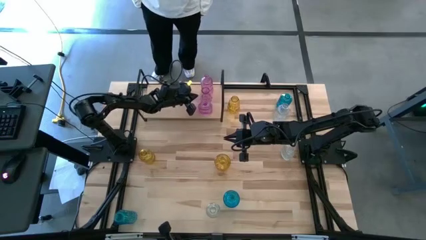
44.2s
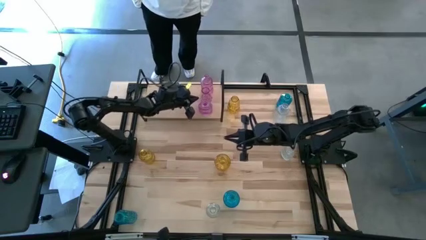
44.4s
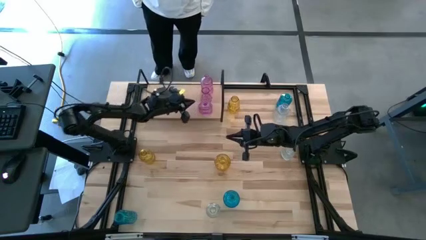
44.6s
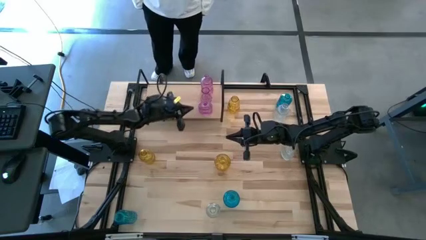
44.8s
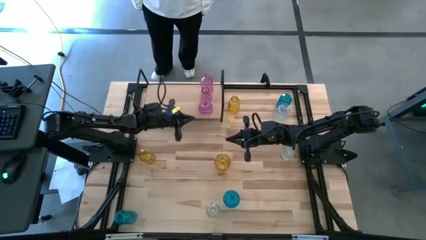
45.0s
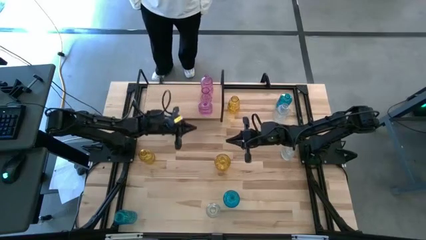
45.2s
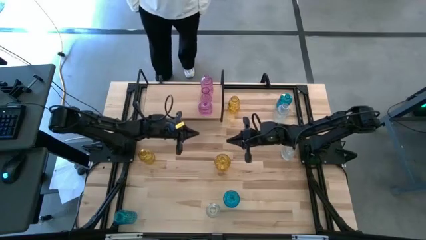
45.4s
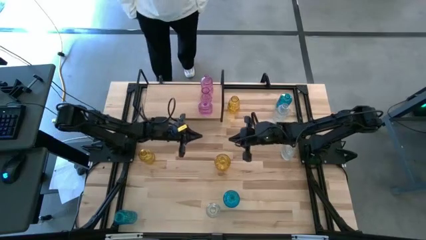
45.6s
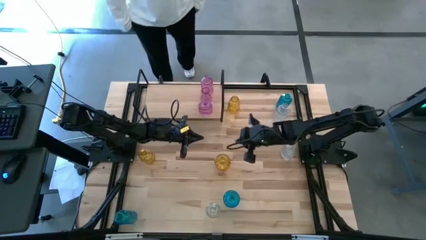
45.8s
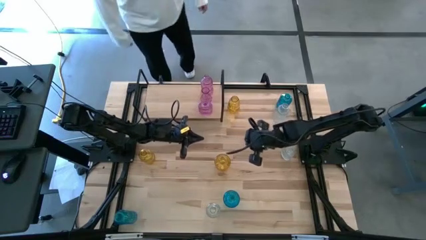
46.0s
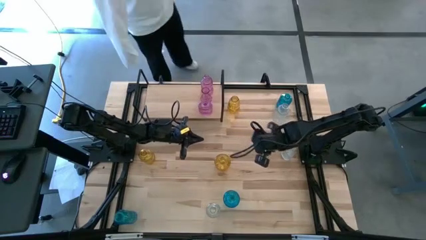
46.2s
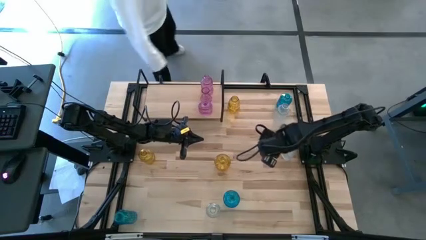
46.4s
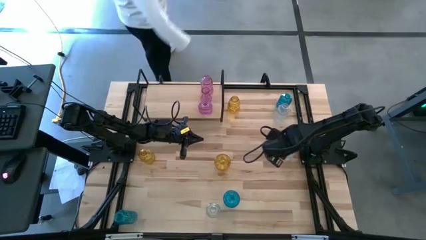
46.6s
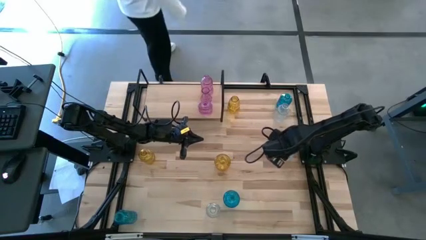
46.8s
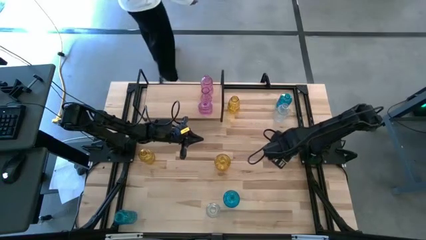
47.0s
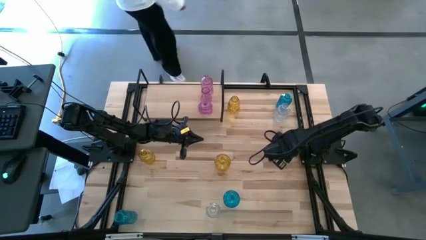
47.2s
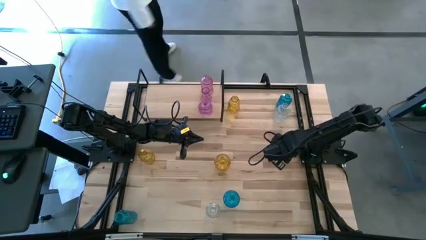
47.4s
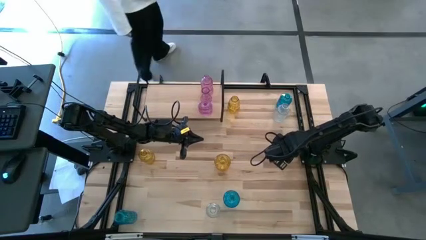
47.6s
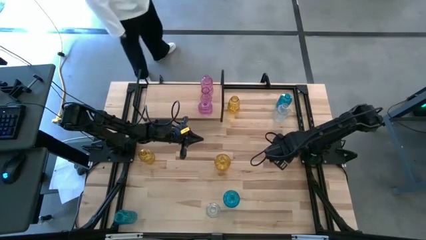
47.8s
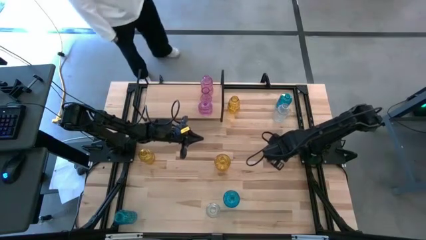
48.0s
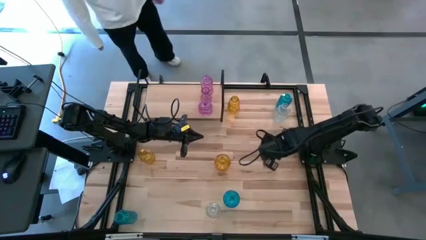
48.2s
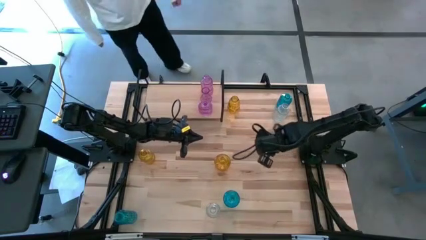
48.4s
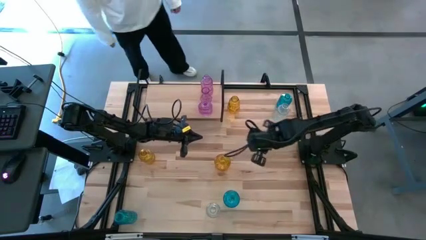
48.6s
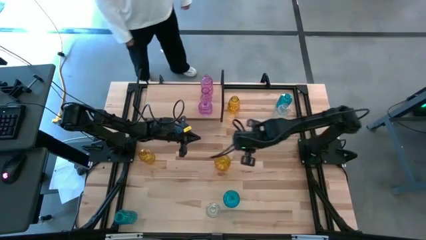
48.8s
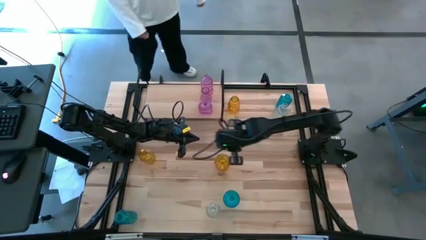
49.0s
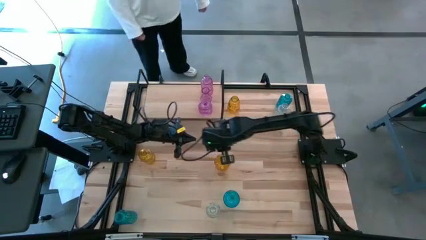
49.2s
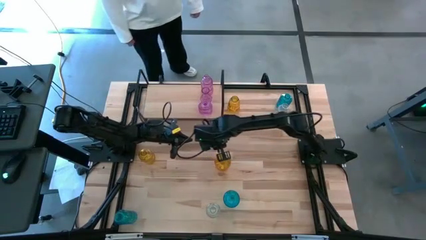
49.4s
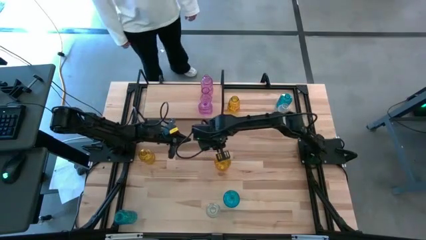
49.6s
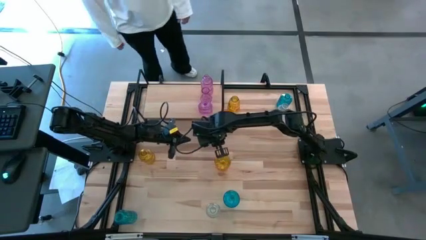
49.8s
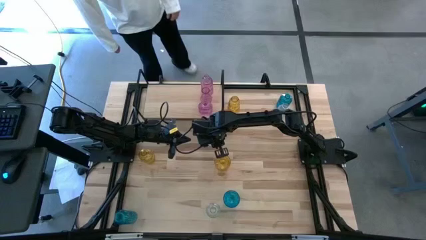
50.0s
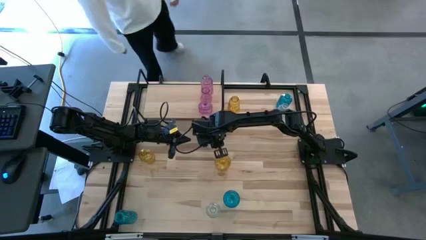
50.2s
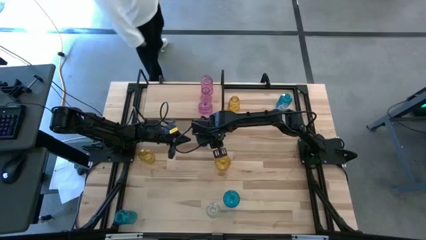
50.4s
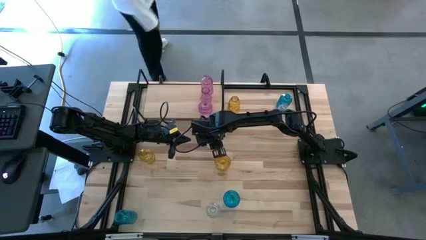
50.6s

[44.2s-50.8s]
Task: sort vases onto shelf
Move the bottom right transparent vase to the center of the table

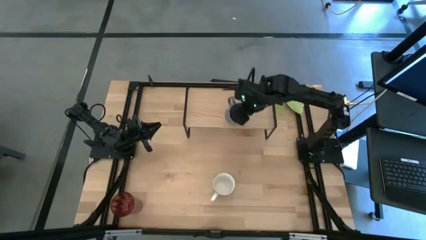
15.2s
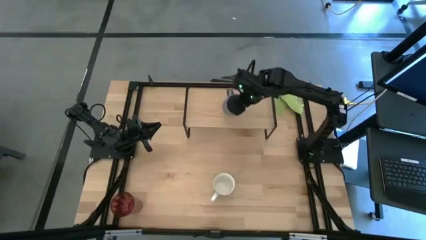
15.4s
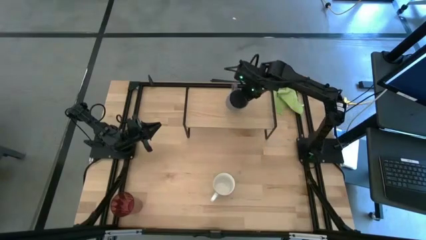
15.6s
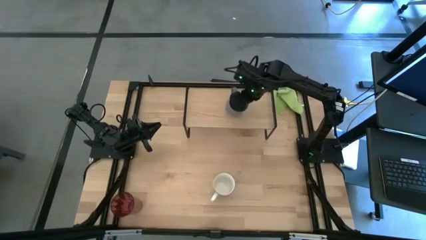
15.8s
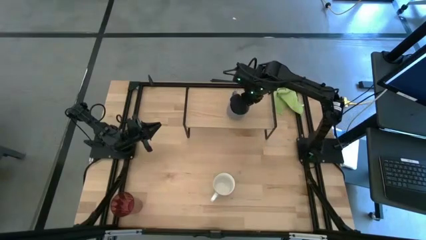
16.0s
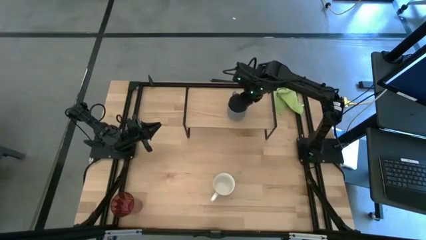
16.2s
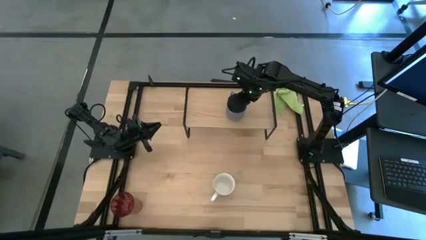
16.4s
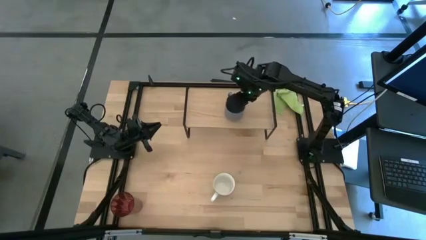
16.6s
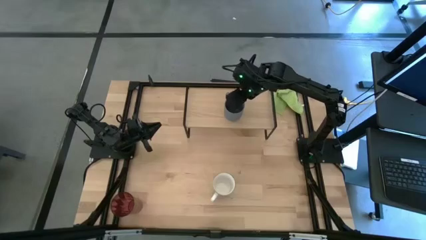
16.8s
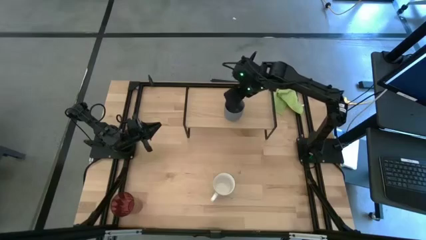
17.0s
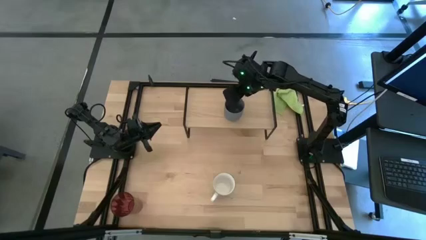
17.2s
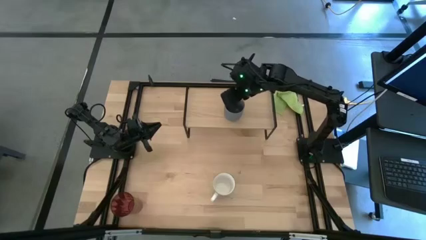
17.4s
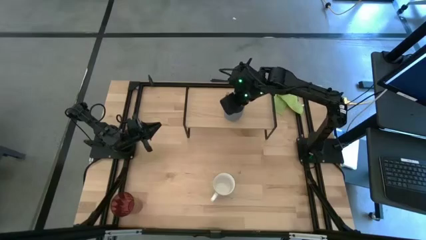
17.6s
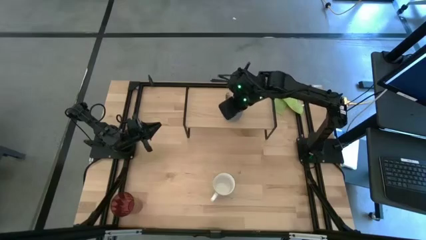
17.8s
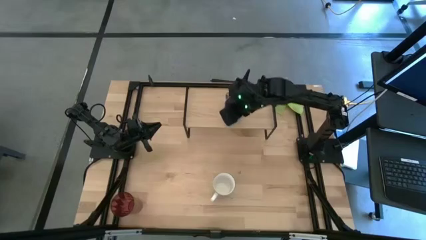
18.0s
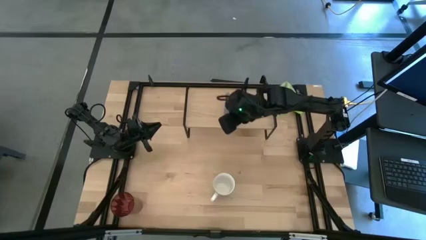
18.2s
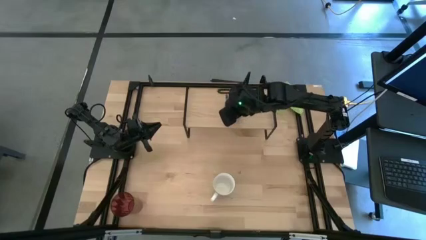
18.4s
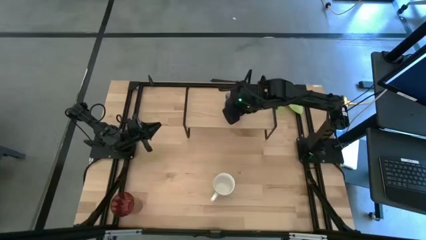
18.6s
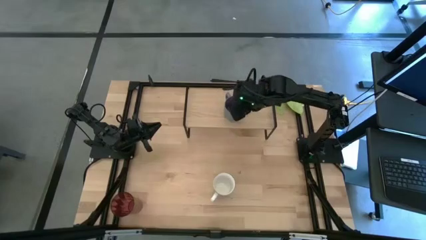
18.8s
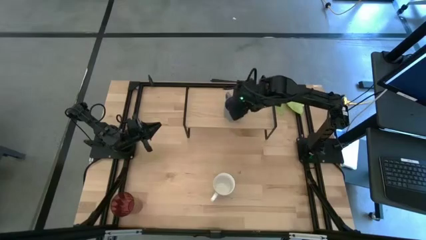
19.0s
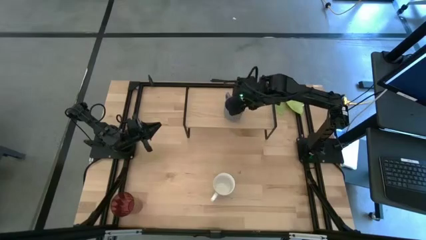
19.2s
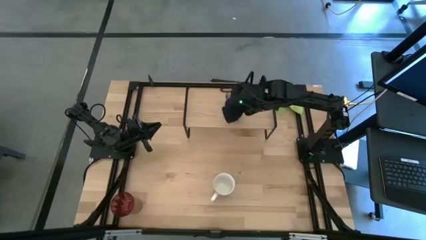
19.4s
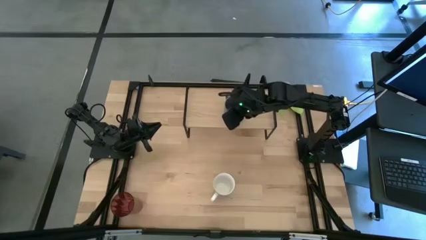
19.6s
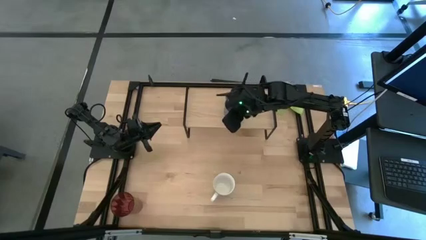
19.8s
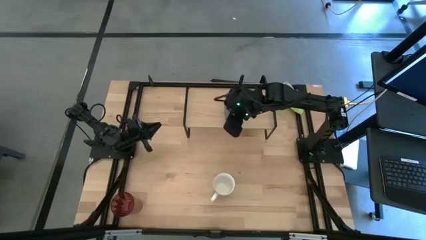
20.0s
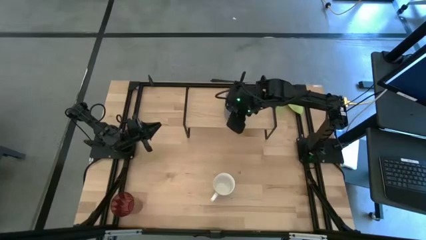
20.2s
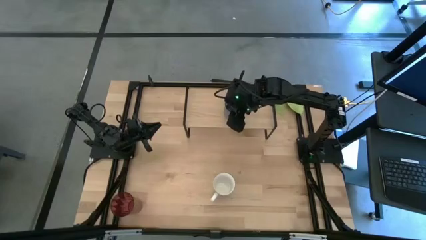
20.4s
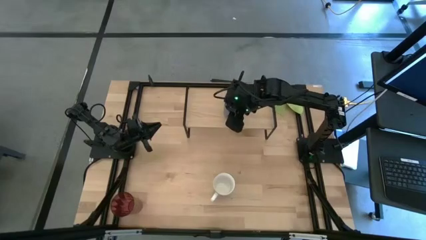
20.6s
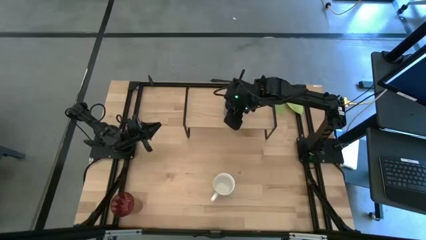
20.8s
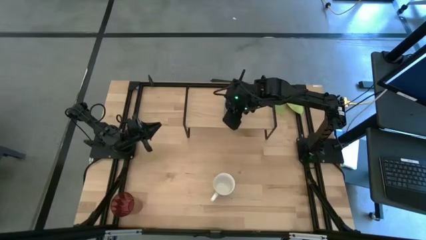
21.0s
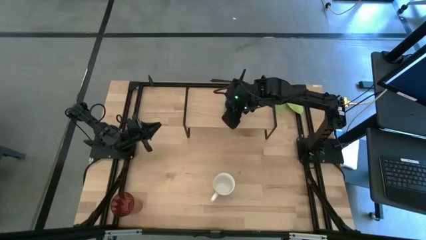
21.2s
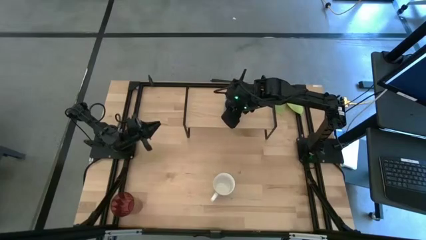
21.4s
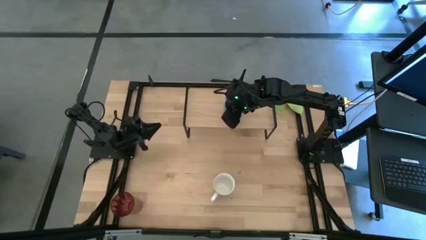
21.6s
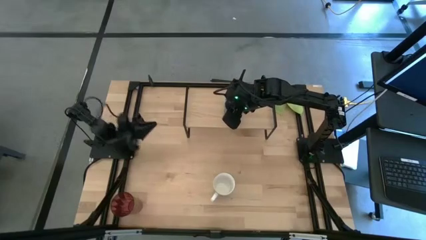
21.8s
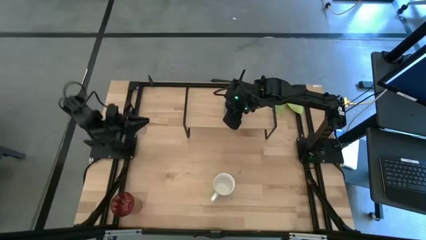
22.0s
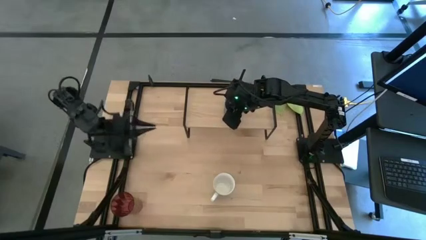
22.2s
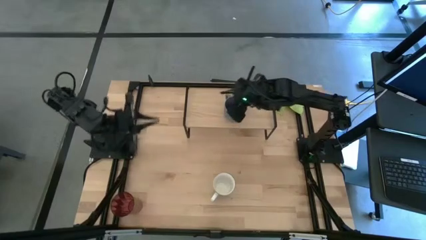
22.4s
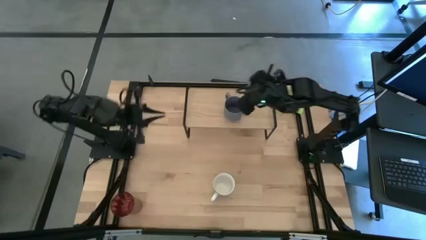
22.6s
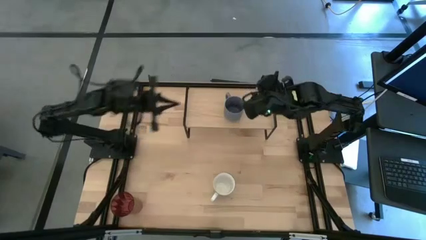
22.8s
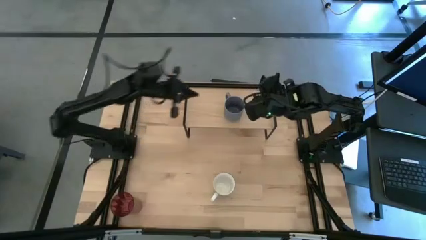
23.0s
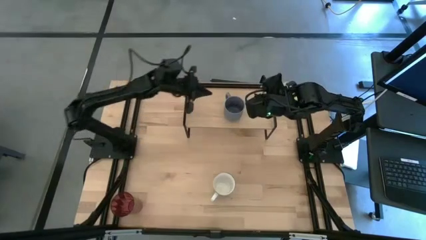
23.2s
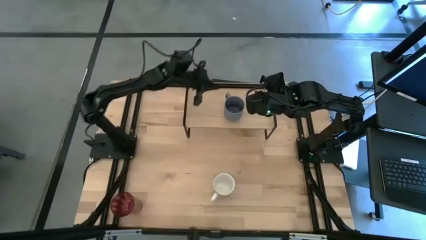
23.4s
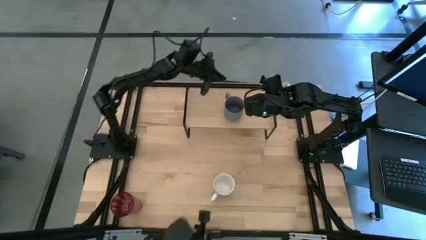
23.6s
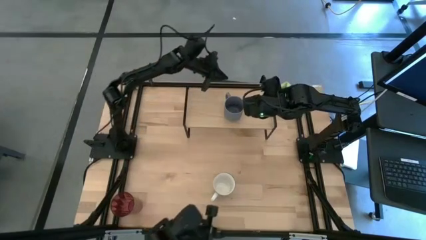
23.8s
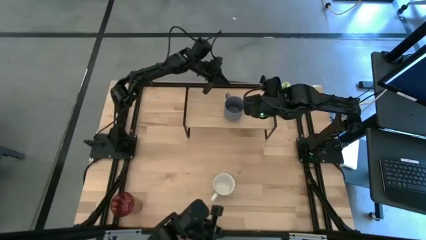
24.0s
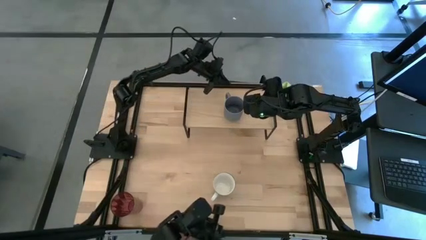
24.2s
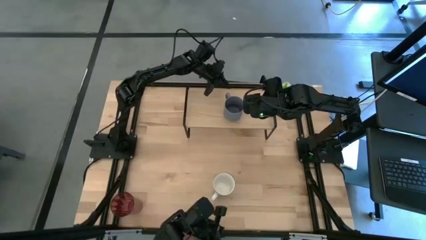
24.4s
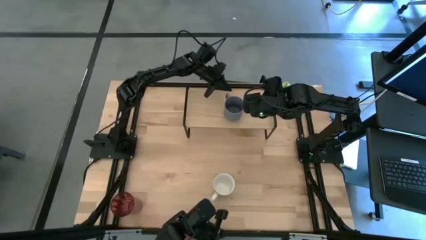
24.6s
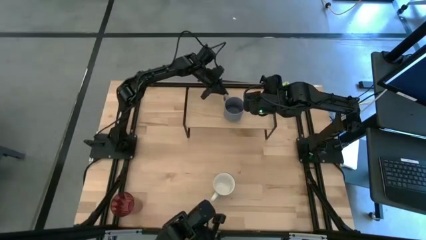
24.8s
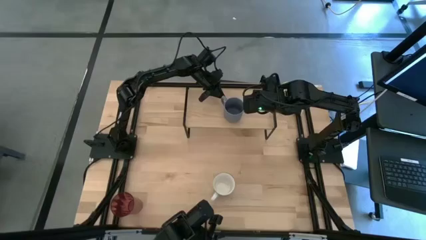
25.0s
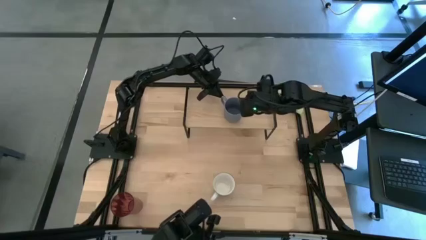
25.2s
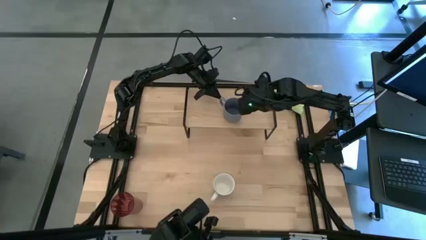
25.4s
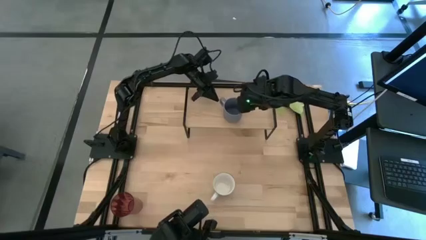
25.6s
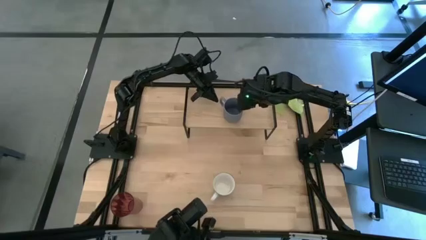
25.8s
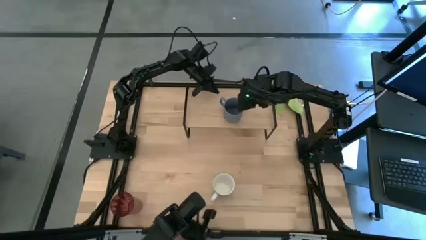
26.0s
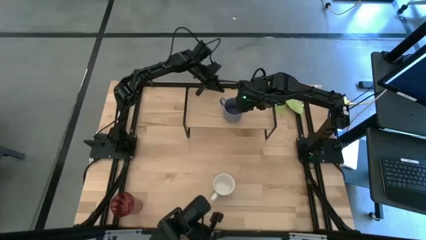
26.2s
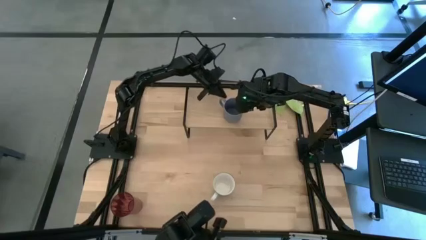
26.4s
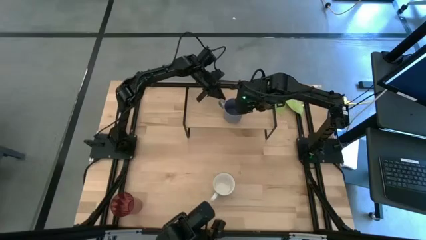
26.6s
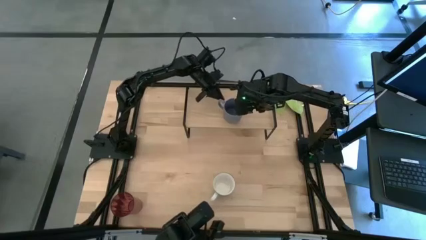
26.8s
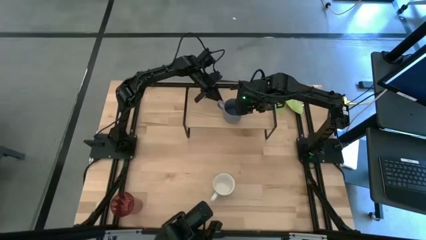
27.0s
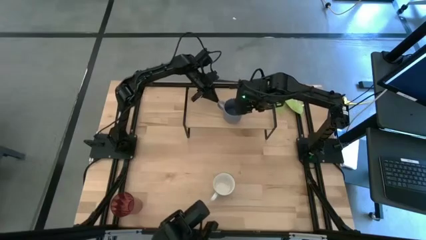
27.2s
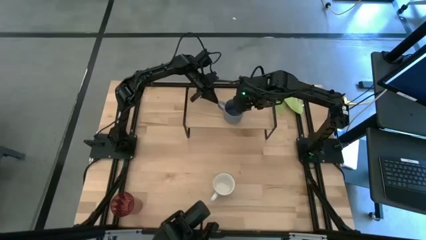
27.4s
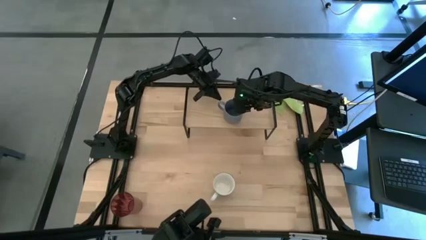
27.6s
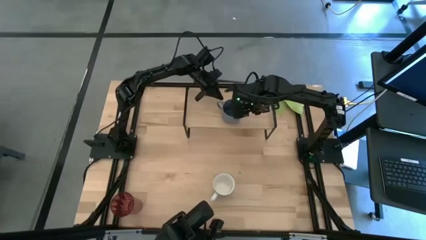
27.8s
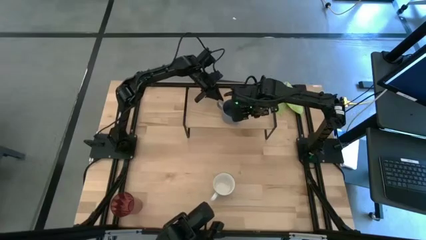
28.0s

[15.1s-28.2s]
Task: Stack small to large cups/mugs on shelf
Put the blue mug on the shelf
